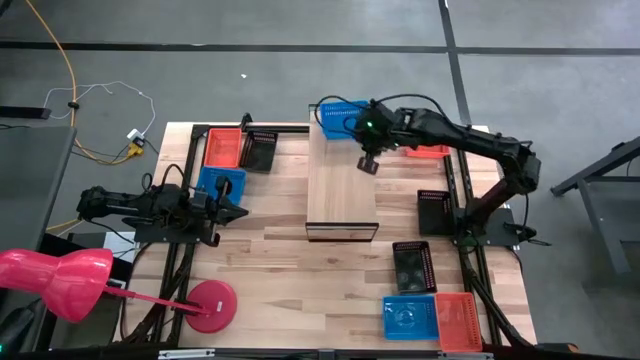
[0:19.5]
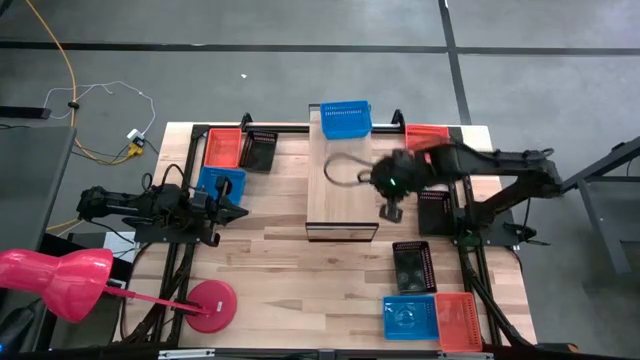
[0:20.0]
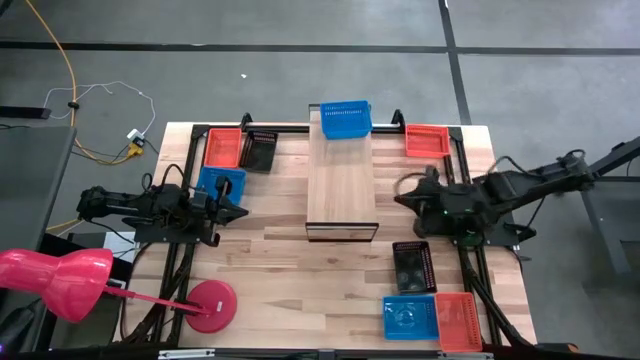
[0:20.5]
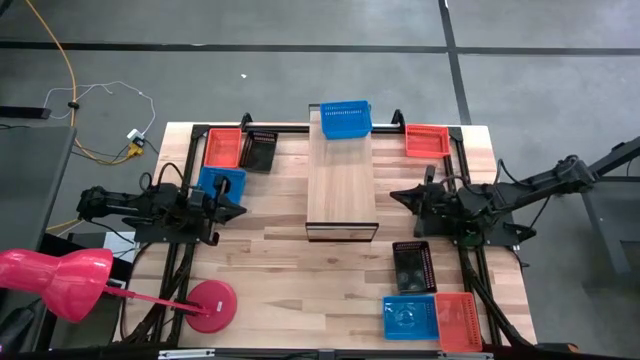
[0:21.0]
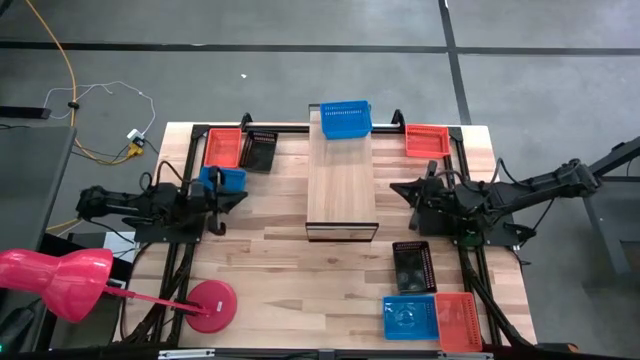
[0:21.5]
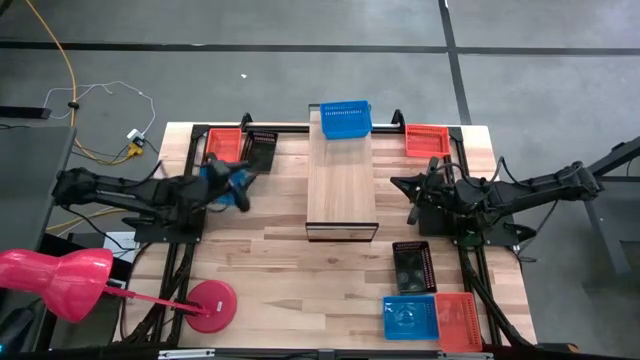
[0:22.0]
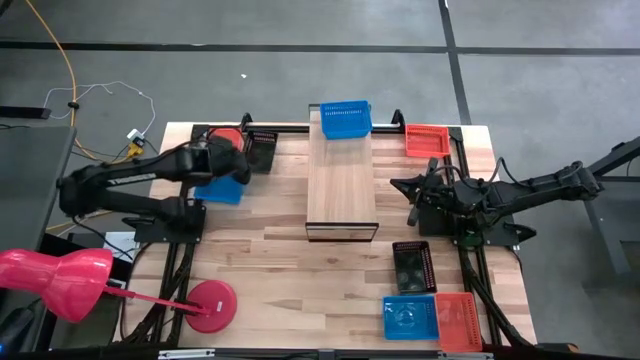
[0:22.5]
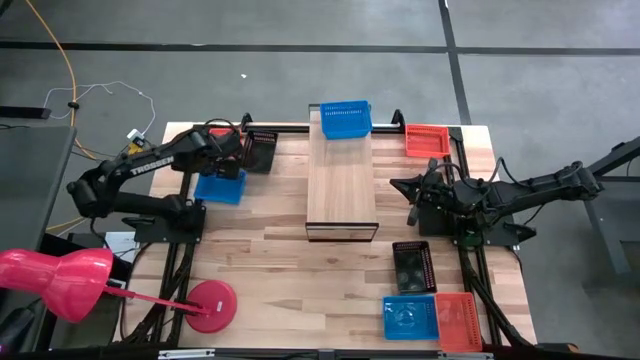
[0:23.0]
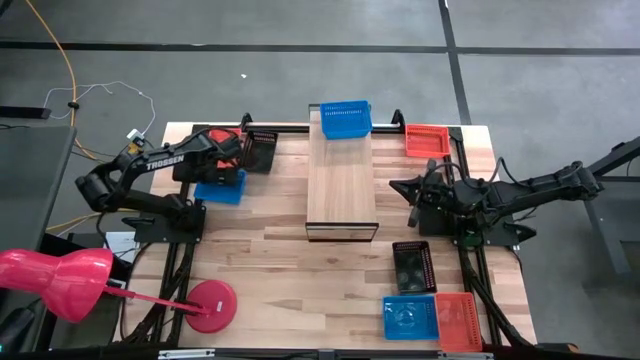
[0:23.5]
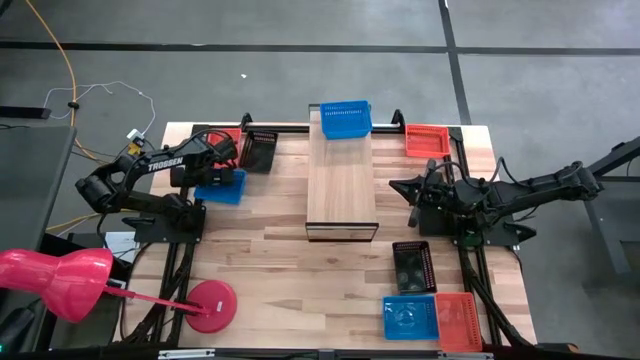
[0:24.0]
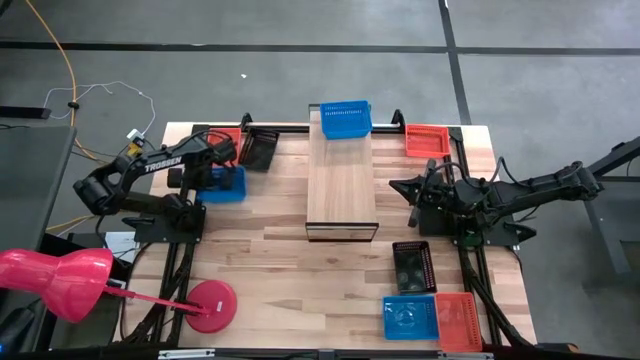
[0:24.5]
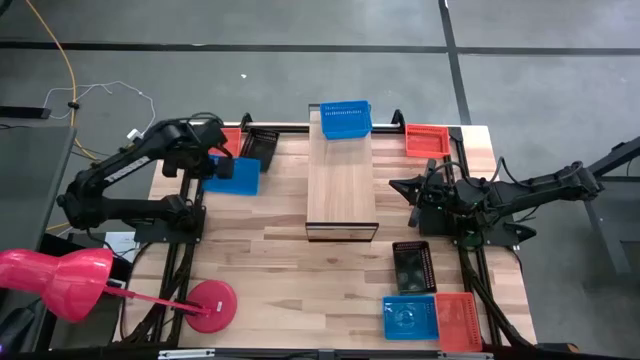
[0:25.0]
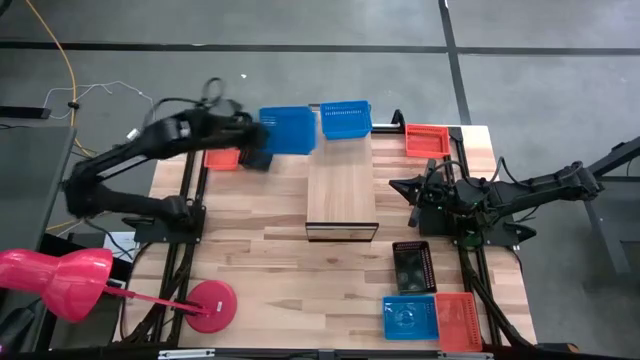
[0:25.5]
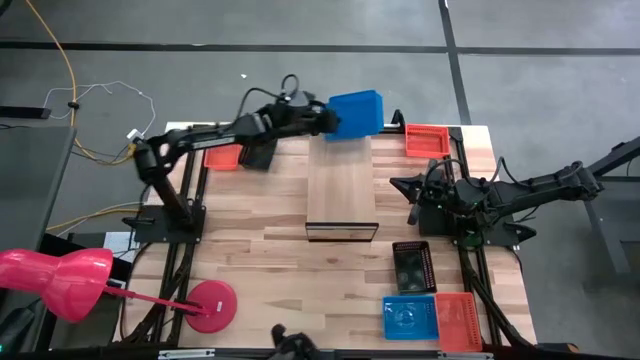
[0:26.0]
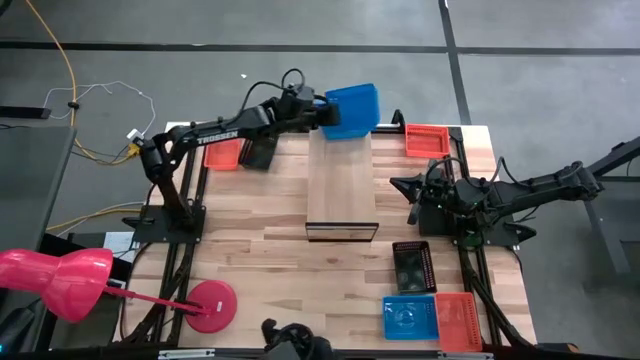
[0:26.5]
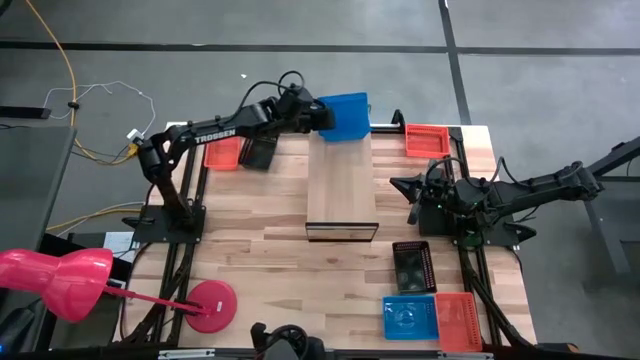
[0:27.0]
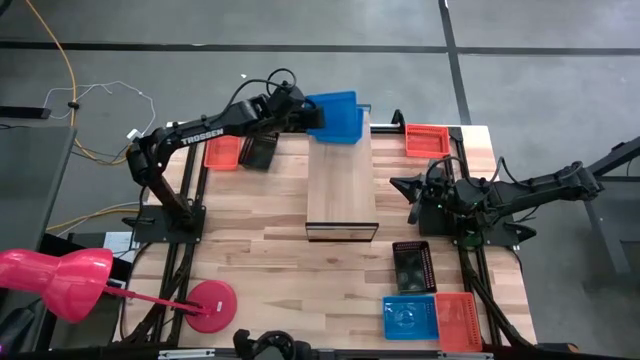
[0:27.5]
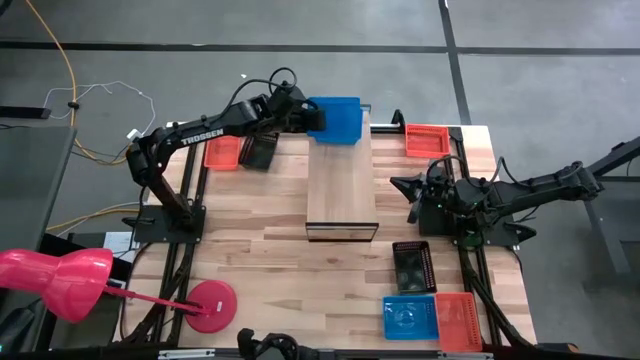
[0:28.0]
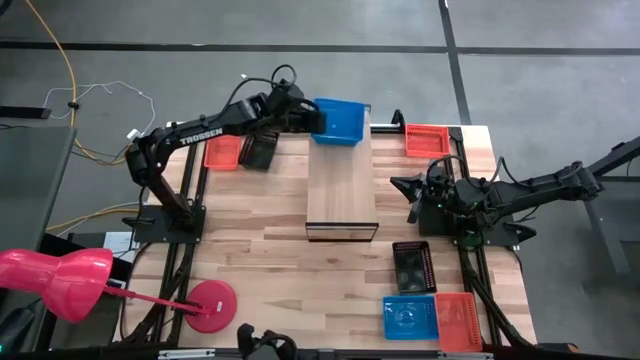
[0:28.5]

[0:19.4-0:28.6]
Task: Stack baskets on shelf by color
Stack the top blue bin on top of the blue bin on the shelf

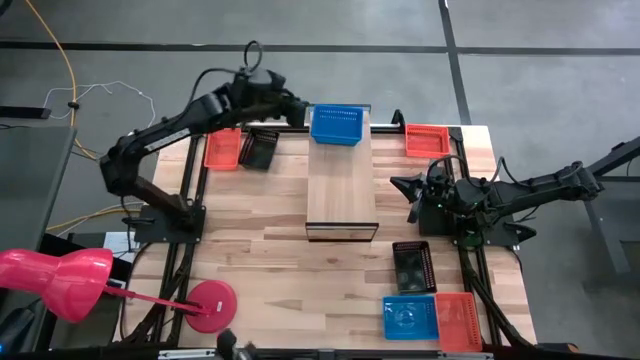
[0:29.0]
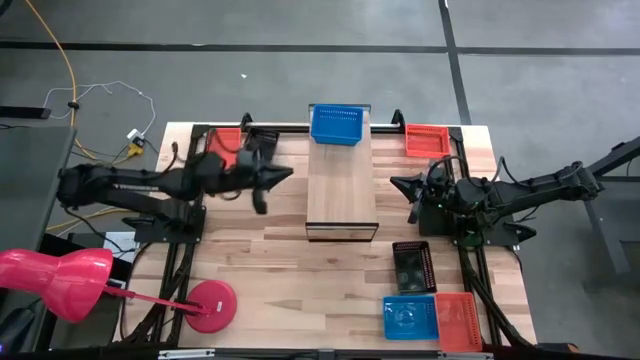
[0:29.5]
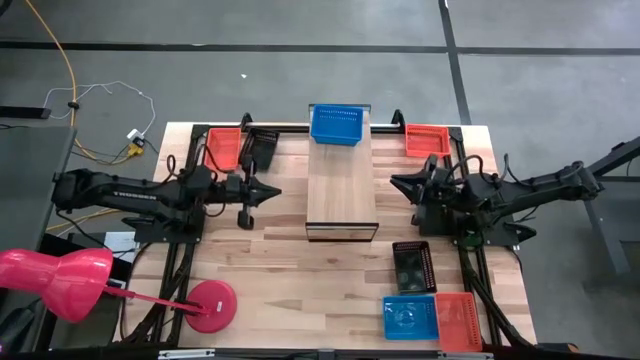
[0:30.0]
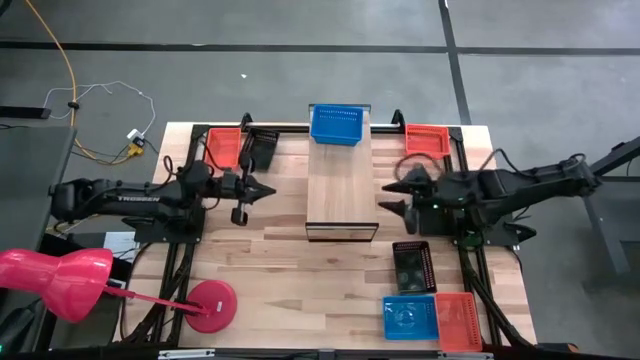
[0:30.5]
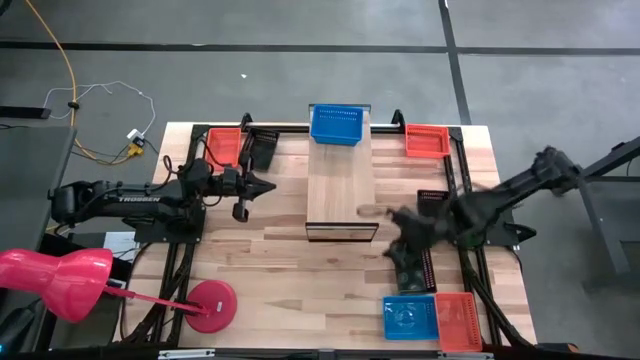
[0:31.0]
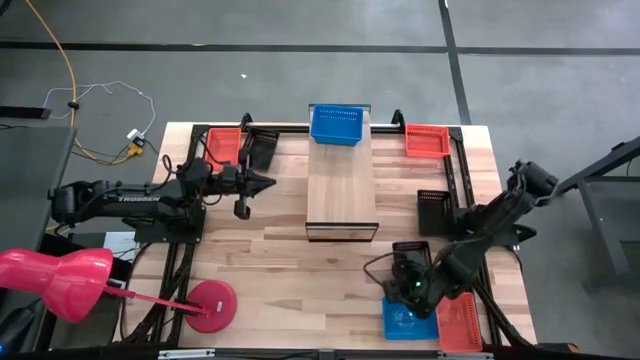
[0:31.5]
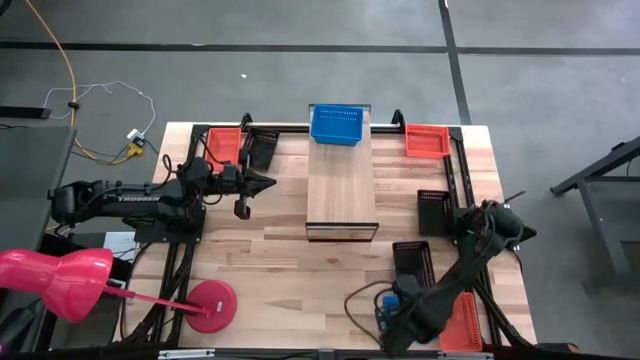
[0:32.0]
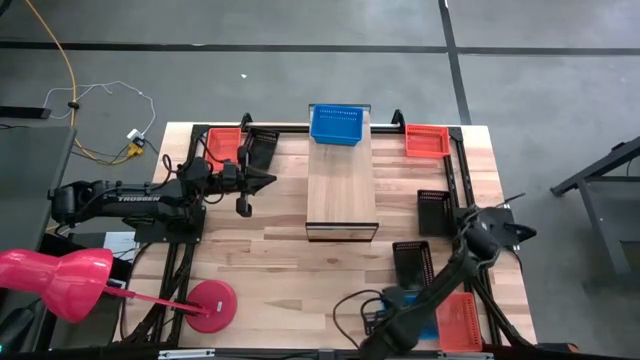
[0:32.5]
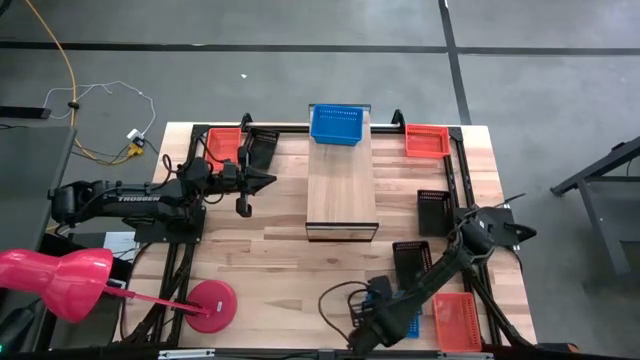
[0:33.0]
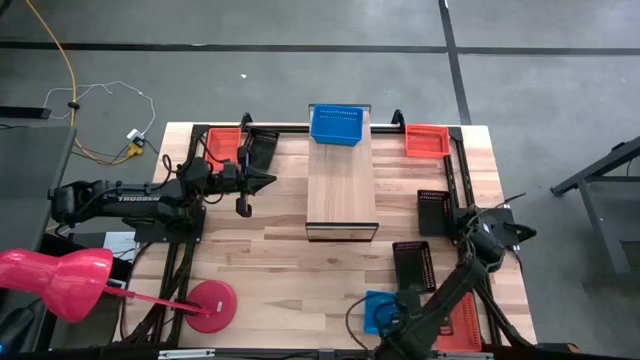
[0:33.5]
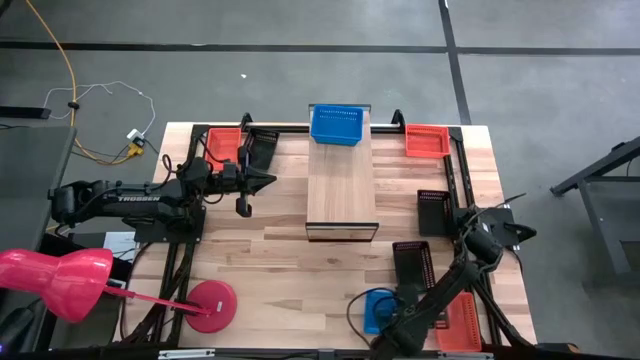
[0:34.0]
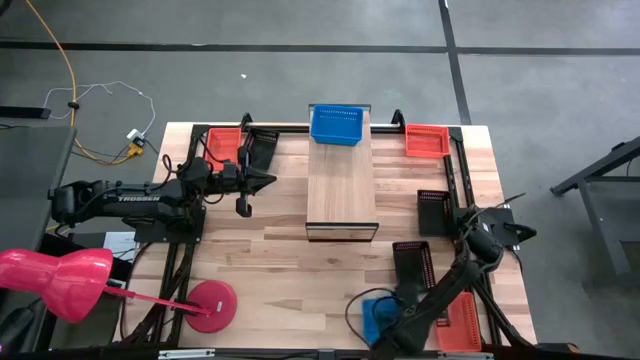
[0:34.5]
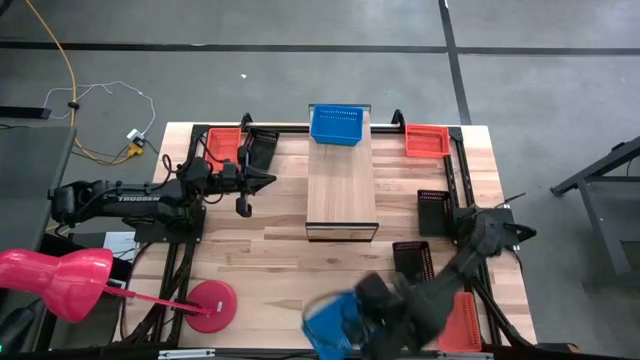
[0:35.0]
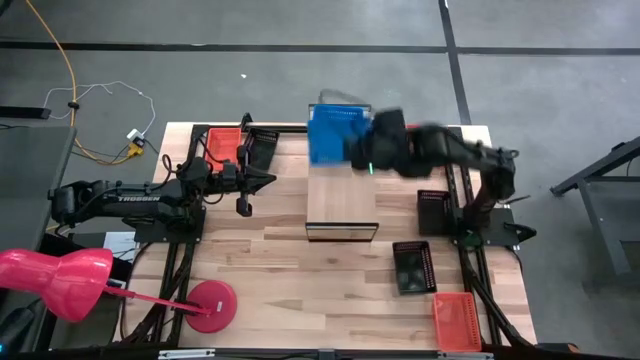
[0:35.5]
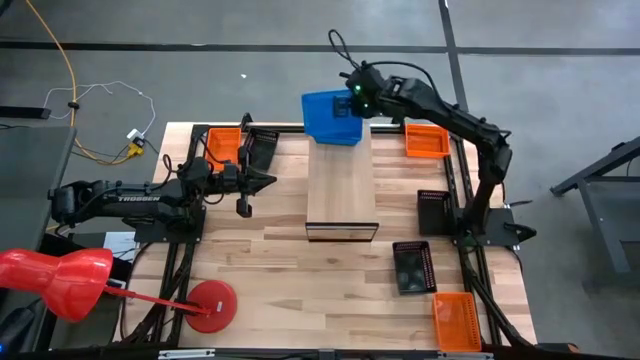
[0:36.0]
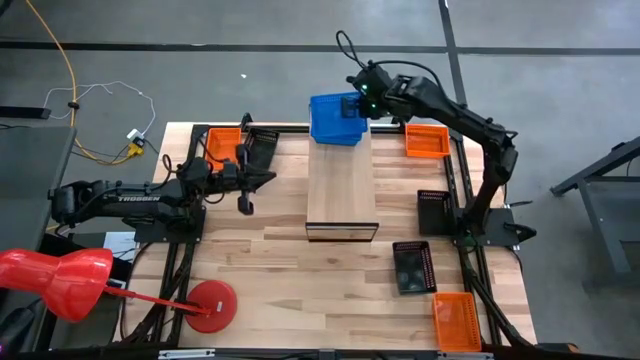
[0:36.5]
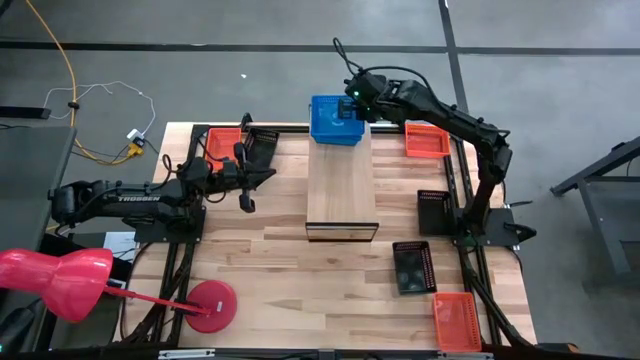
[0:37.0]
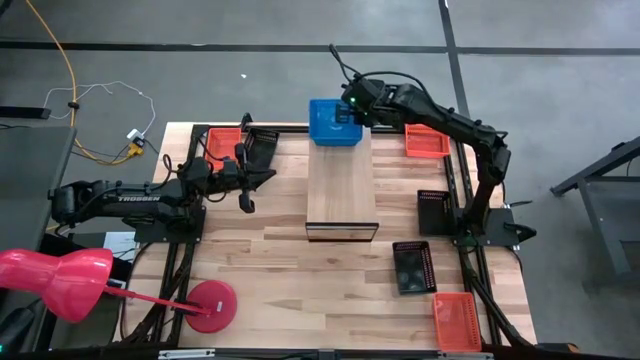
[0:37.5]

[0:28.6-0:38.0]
Stack the blue bin on top of the blue bins on the shelf

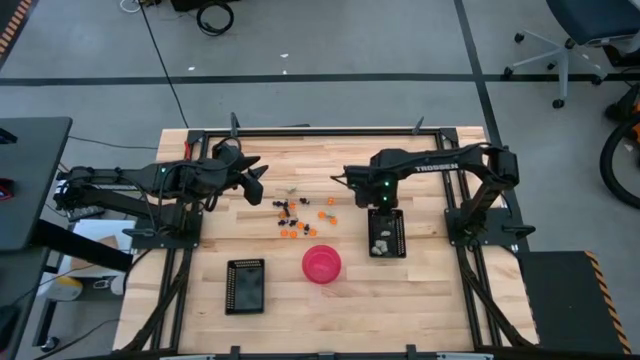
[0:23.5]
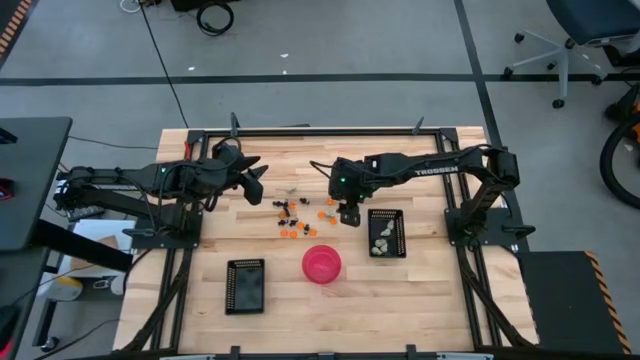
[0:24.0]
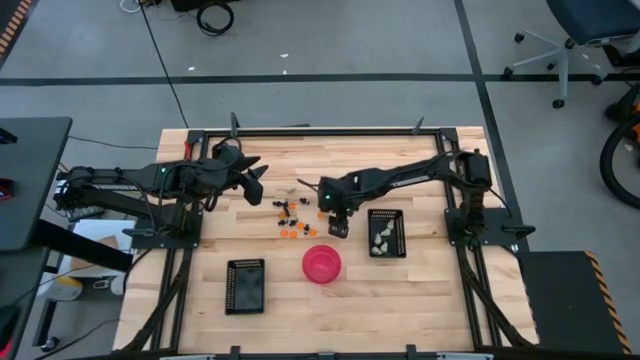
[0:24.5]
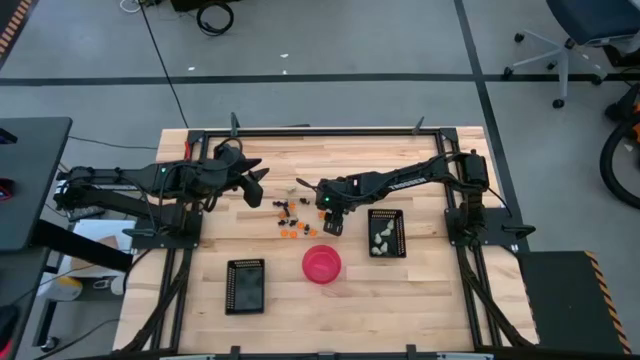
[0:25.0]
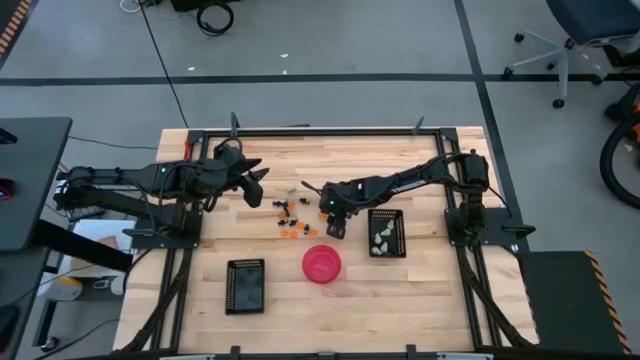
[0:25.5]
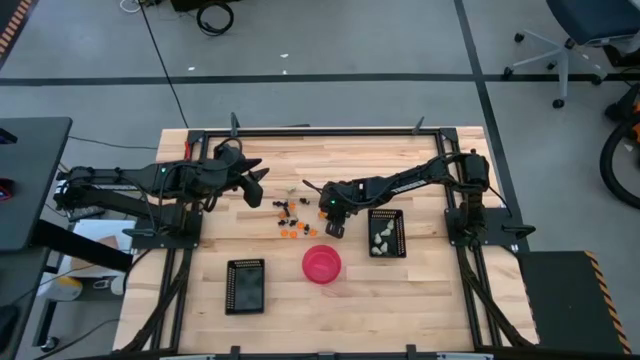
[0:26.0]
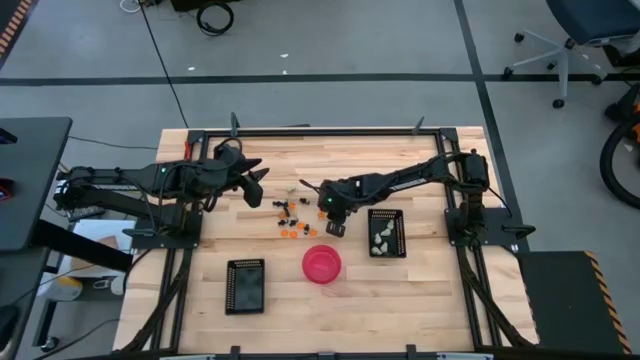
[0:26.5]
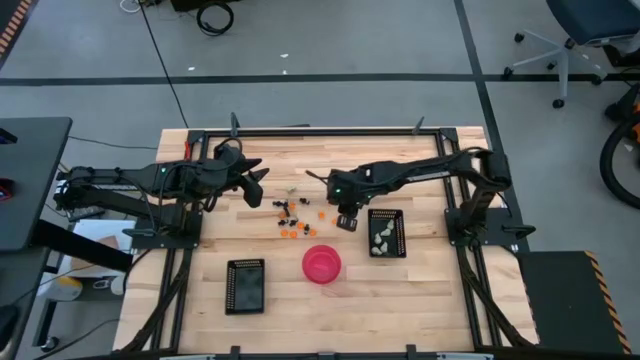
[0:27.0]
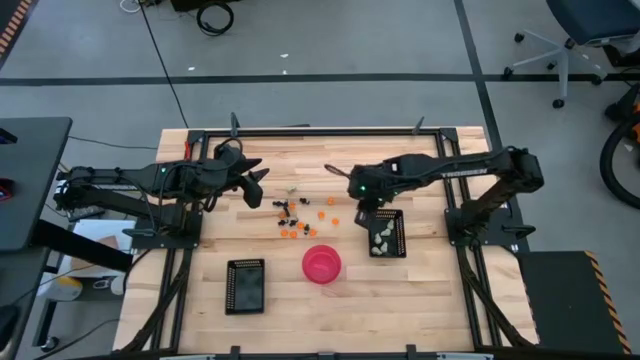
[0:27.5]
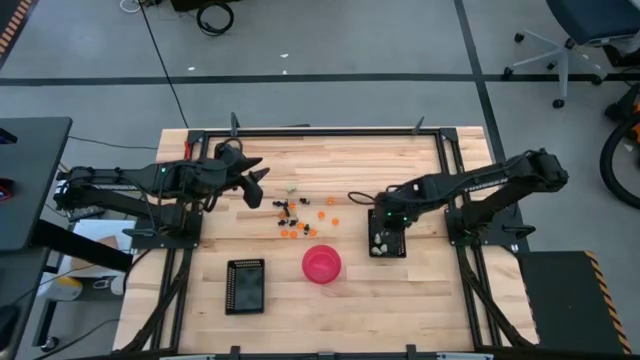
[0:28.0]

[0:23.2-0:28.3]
Task: Sort Halloween decoration
Put the white skull toy into the top black bin
